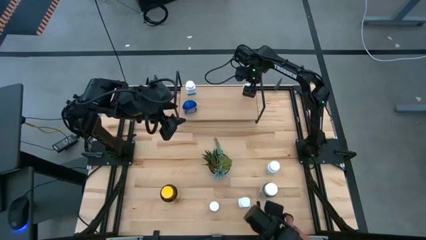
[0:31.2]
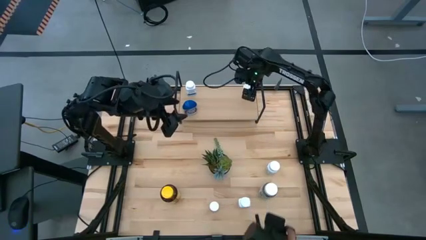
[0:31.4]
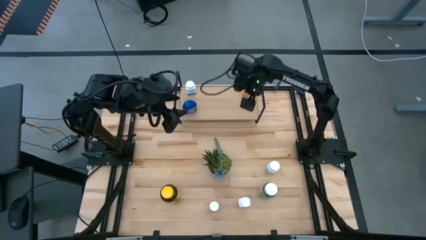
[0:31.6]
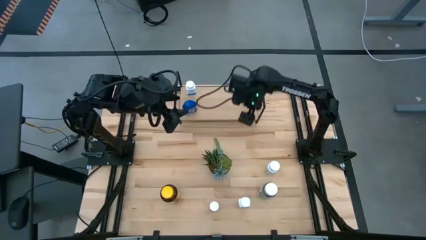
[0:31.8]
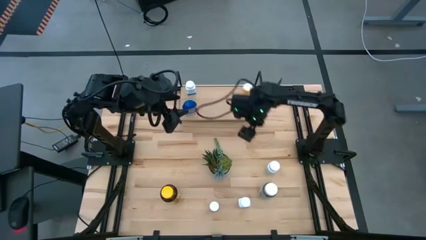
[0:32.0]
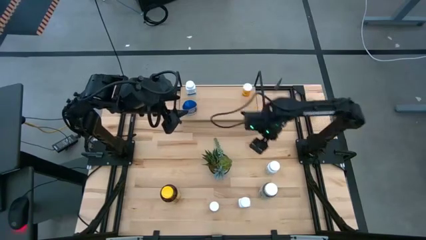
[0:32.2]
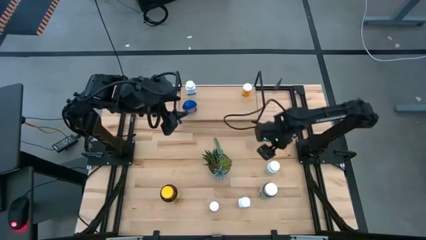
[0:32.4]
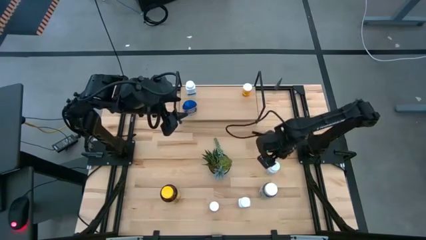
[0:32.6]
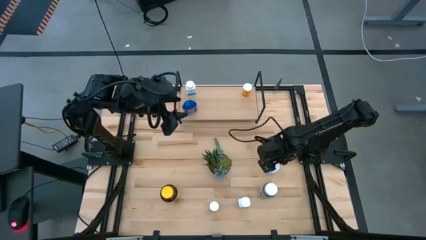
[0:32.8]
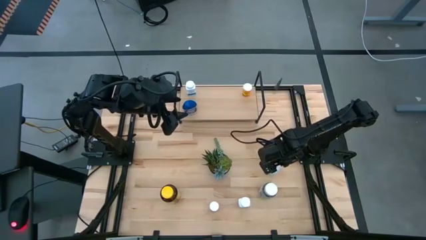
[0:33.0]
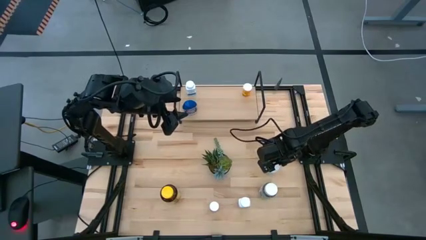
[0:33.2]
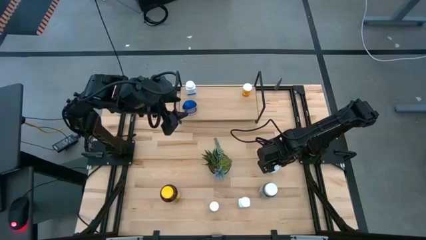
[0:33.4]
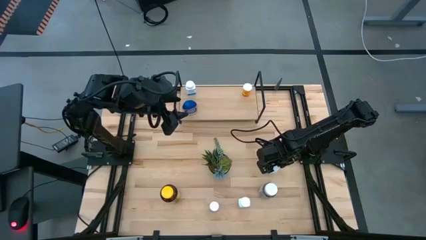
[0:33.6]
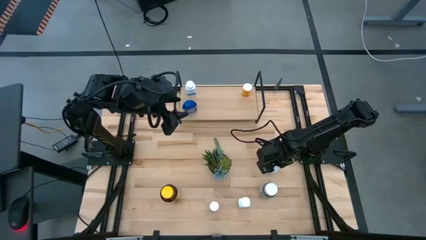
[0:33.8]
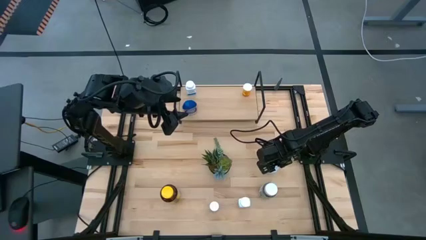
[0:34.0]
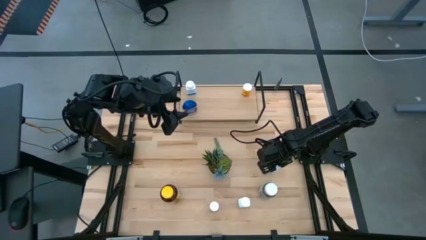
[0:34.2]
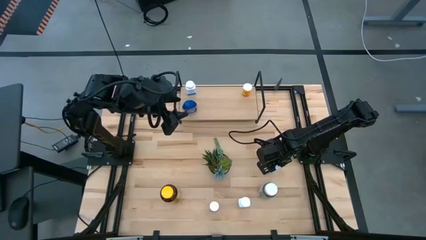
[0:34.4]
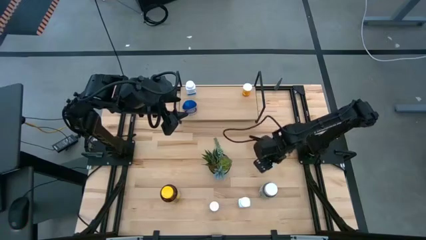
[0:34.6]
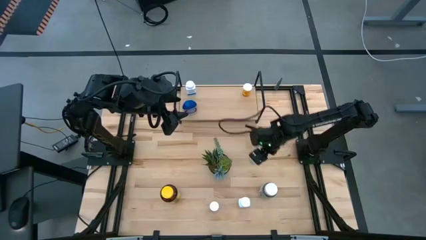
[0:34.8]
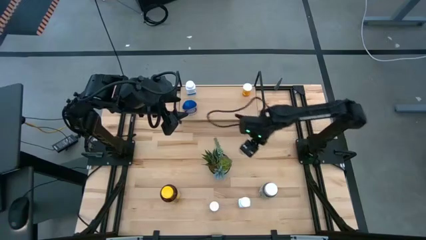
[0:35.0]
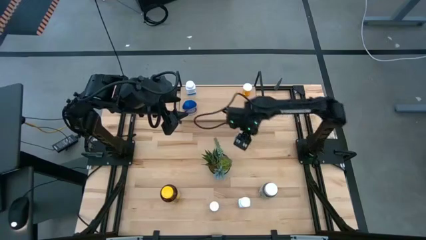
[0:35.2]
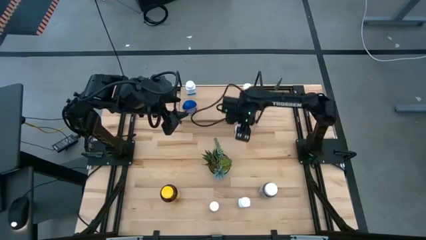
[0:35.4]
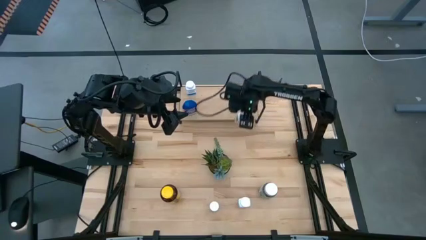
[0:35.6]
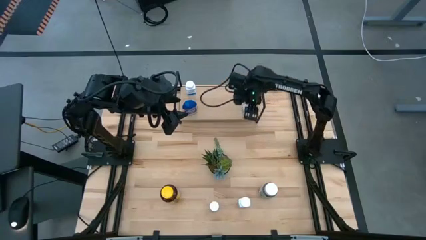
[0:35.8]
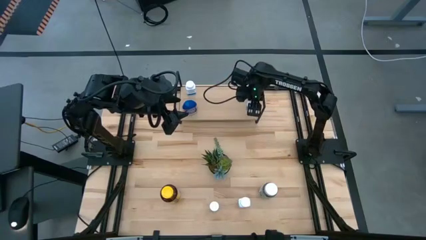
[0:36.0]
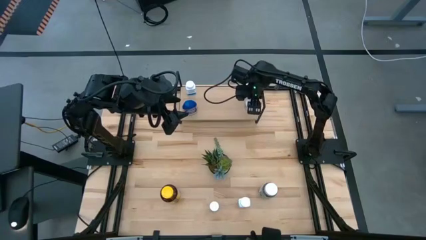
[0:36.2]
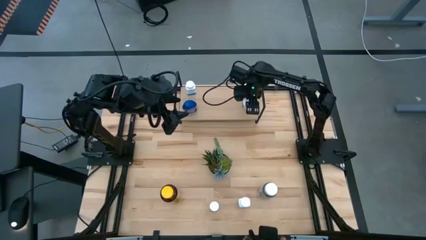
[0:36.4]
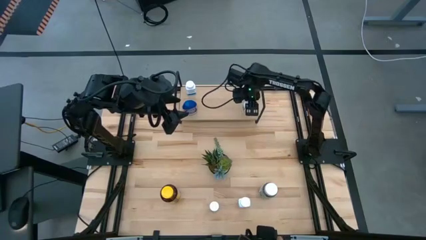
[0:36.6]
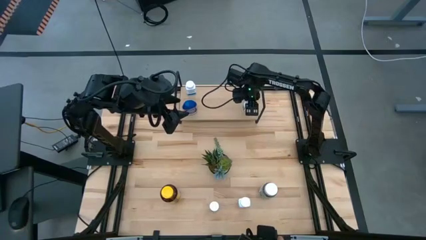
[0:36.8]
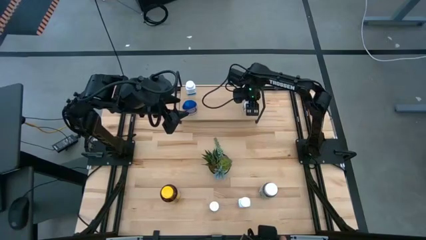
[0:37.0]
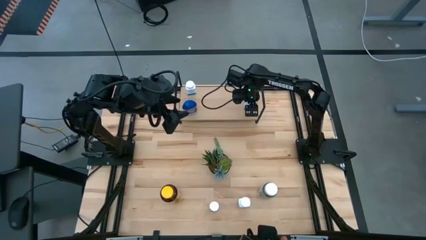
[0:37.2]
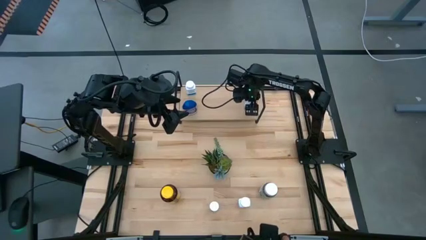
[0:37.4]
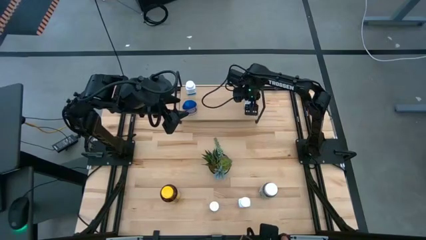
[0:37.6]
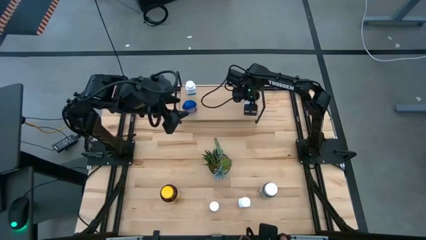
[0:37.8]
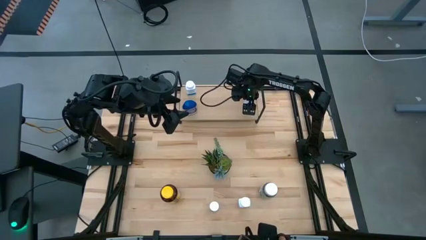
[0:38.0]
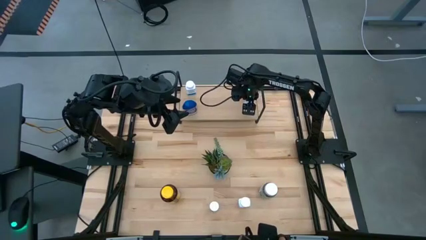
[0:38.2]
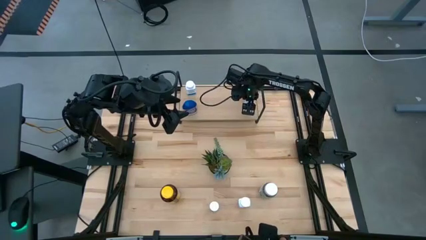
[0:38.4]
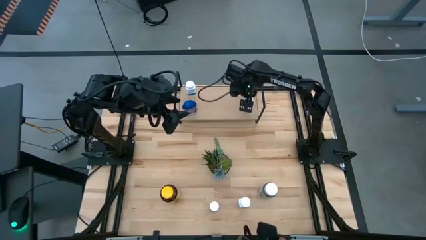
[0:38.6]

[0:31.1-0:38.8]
Task: Pick and place medicine bottles onto shelf by color
Put the green pill bottle on the shelf

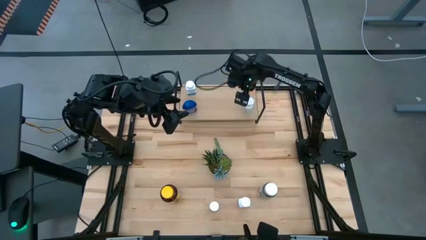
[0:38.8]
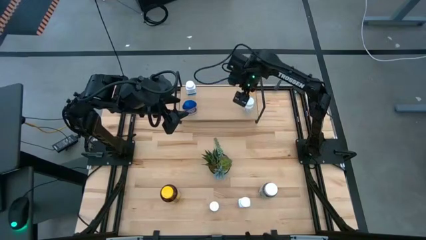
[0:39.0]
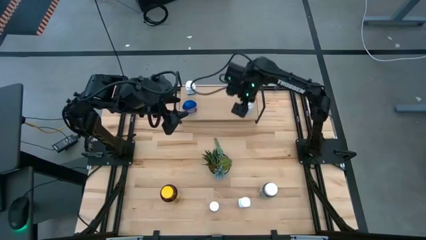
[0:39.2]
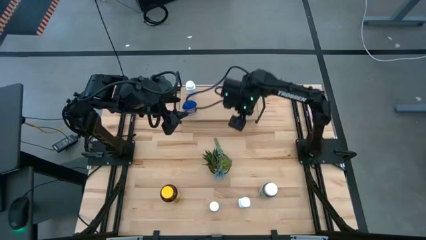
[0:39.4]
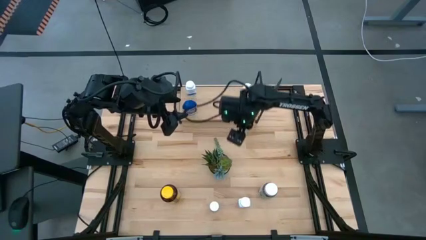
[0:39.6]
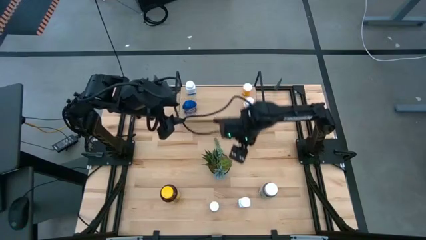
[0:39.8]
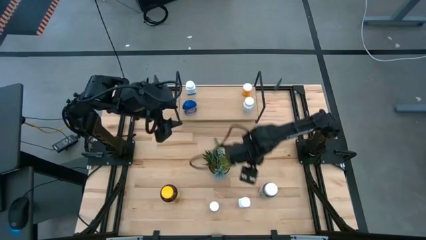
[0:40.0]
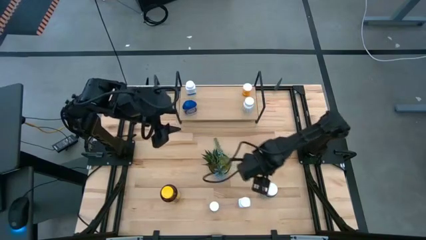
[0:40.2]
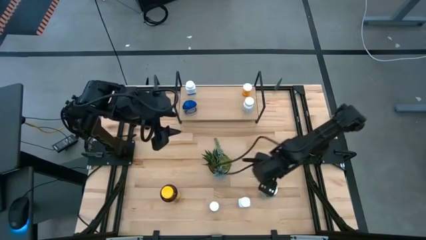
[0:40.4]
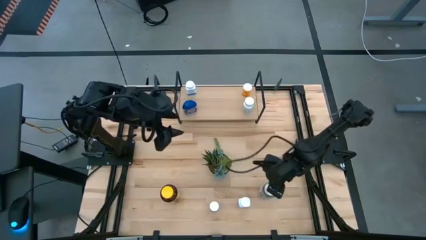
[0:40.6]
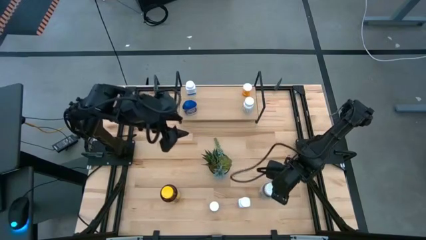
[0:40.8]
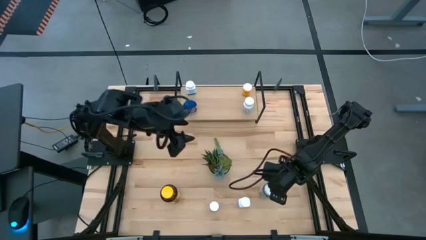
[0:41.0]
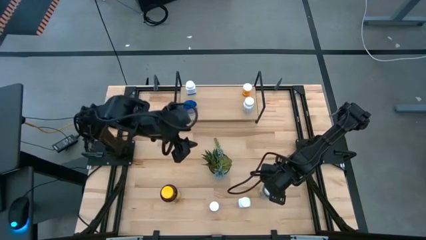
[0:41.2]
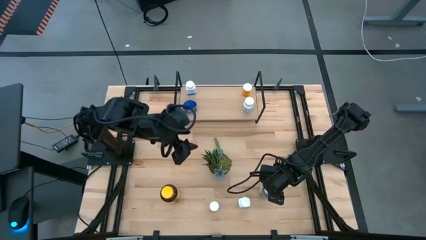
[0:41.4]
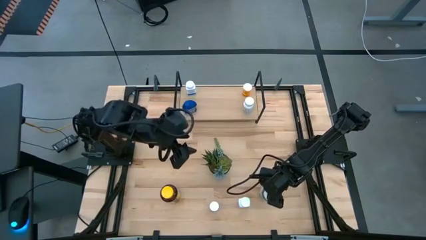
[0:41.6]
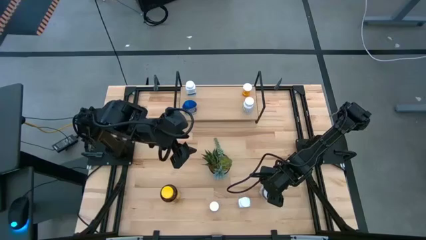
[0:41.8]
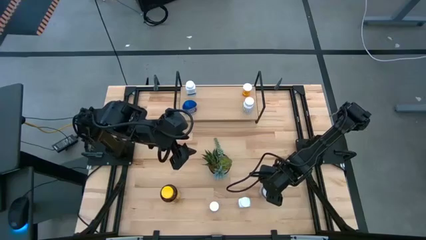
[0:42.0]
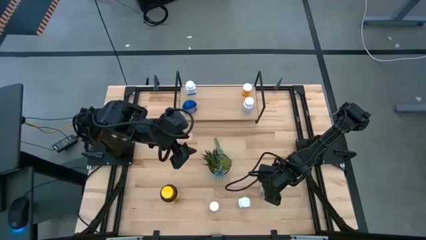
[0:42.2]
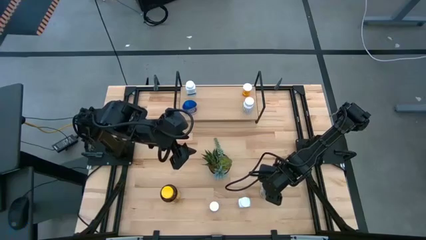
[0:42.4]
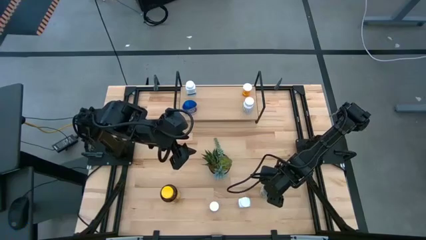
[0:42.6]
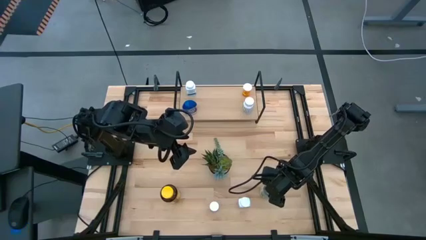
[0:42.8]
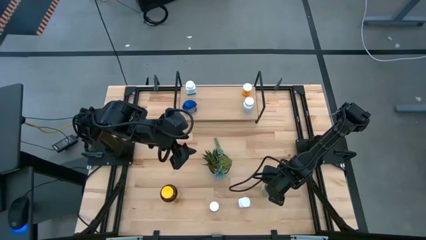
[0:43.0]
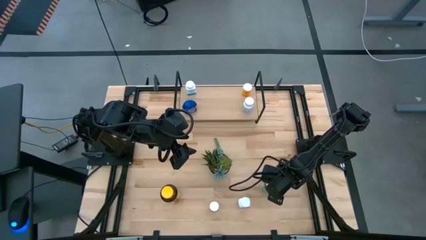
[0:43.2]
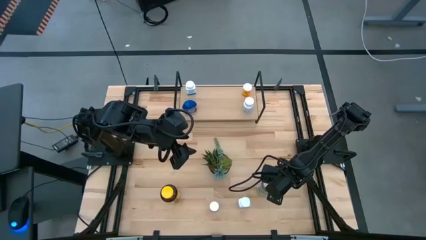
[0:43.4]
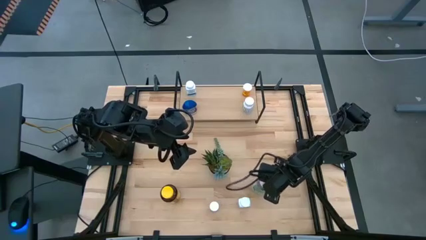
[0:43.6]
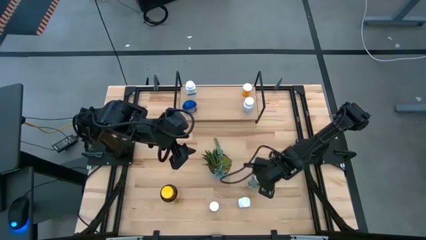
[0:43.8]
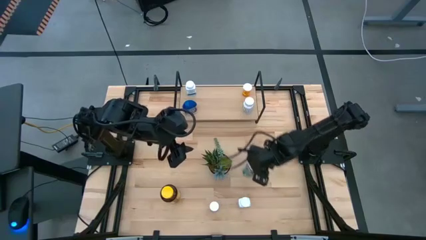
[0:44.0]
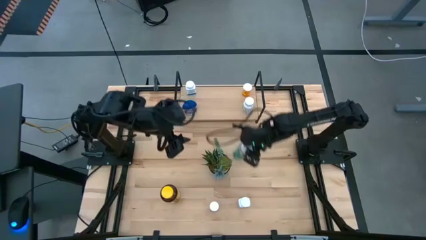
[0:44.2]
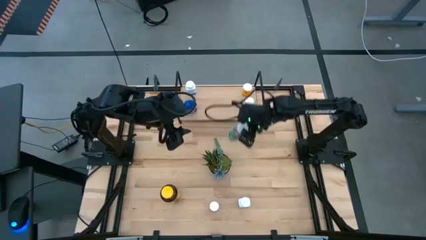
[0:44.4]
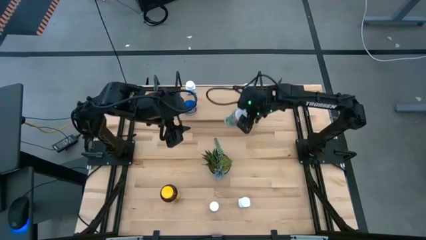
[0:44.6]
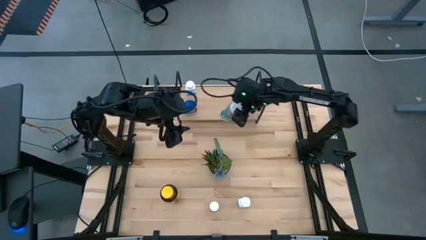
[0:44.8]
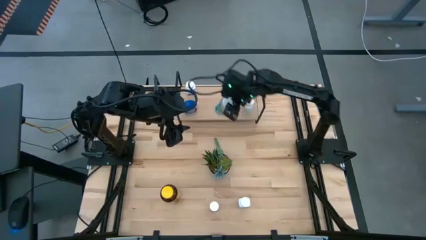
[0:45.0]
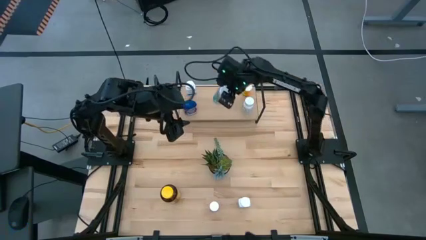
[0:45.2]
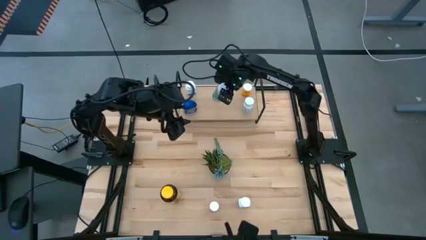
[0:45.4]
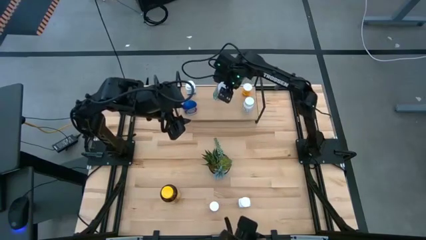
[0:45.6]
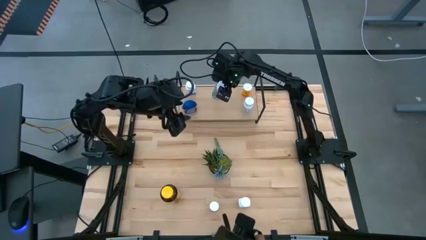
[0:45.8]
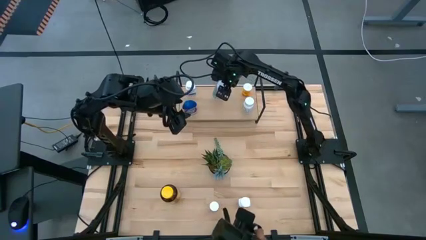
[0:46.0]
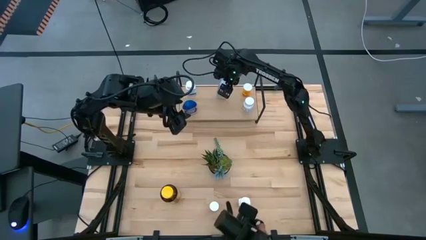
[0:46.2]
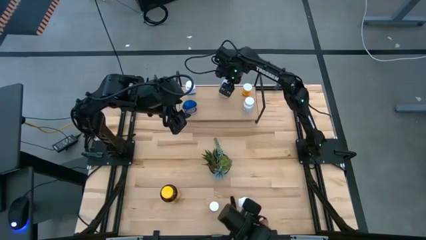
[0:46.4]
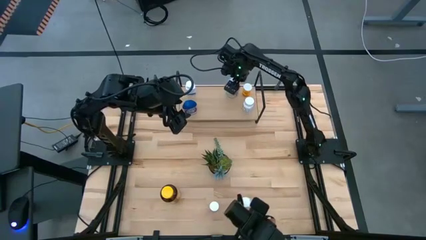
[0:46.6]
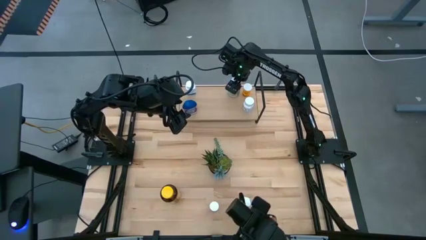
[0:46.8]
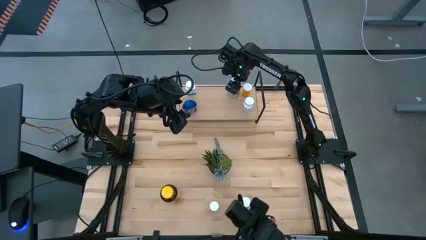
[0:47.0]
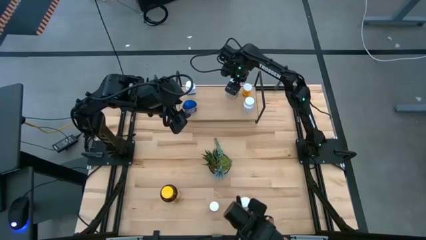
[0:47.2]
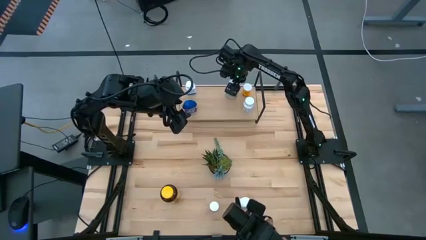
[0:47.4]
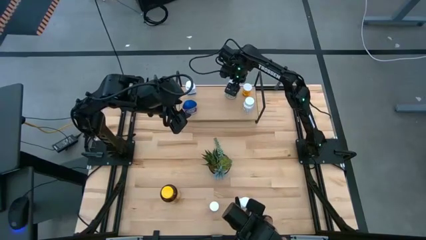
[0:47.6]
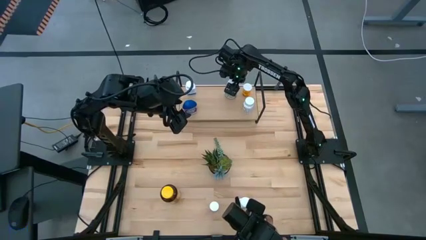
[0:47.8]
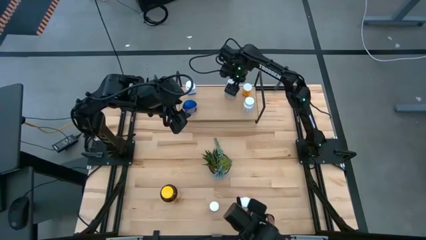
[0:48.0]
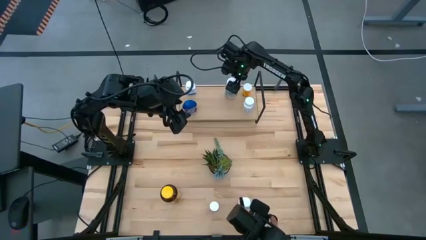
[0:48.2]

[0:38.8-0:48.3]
Put the light green pill bottle on the shelf
